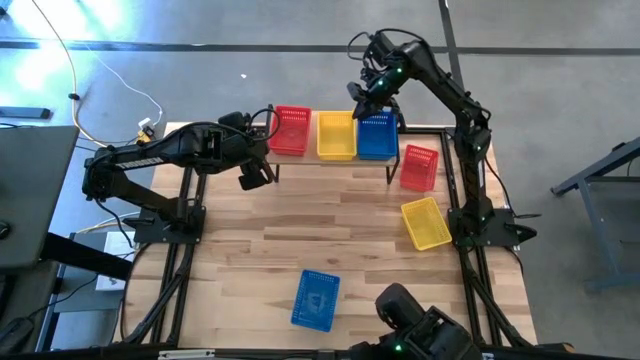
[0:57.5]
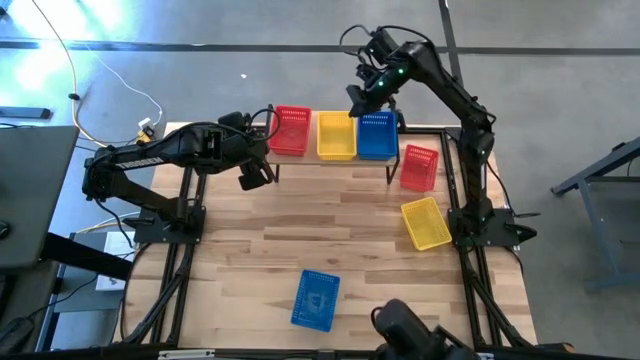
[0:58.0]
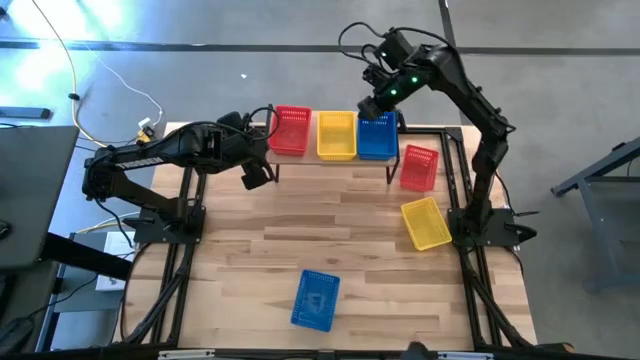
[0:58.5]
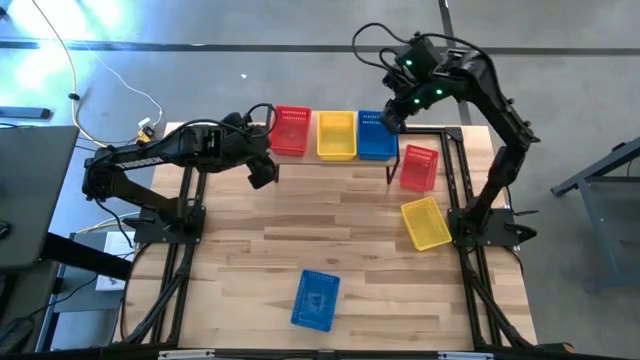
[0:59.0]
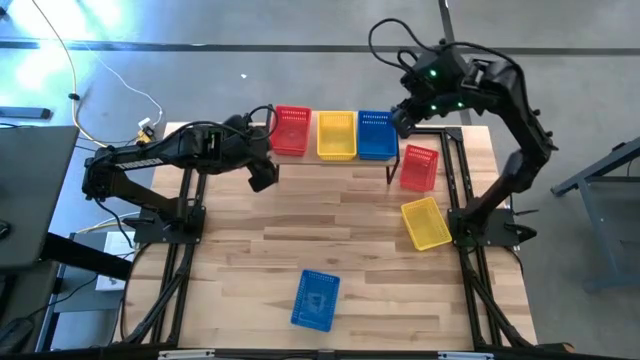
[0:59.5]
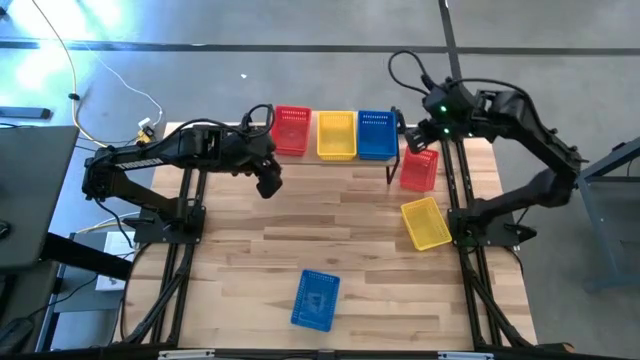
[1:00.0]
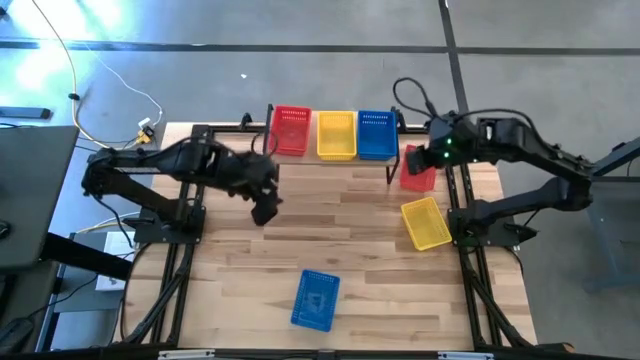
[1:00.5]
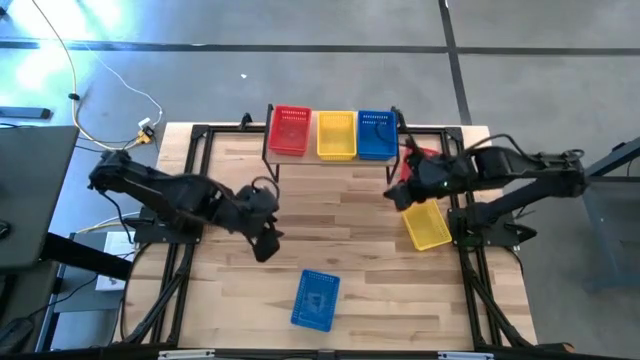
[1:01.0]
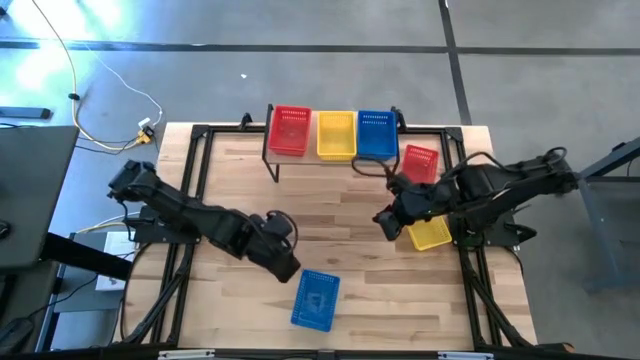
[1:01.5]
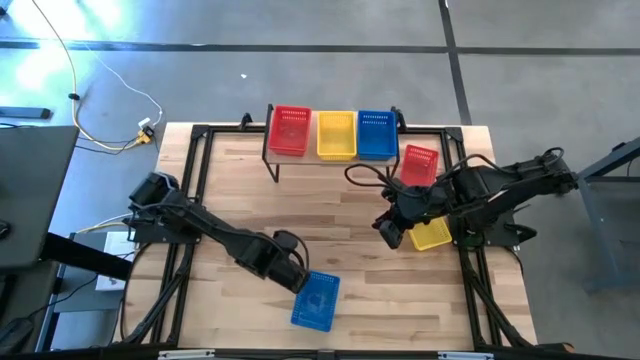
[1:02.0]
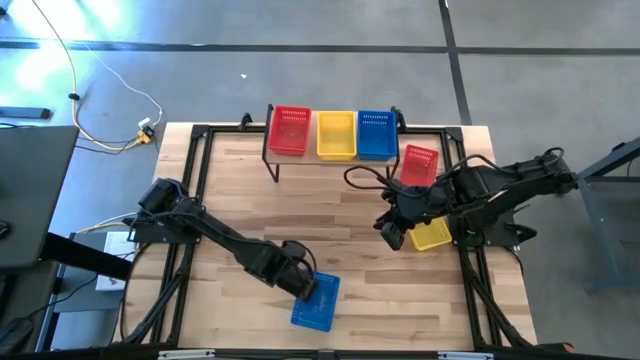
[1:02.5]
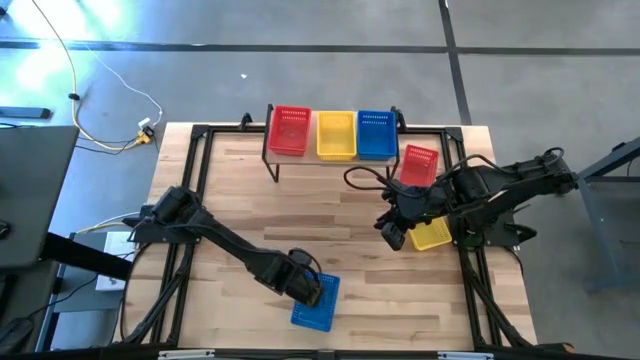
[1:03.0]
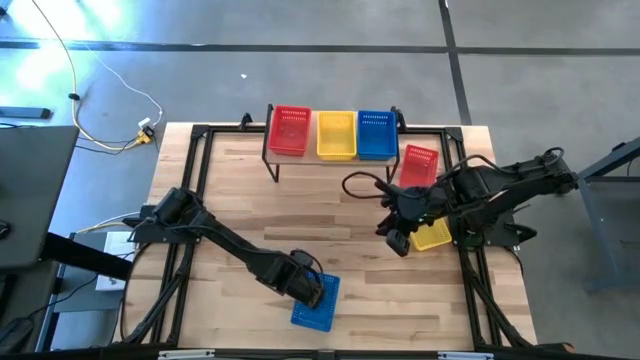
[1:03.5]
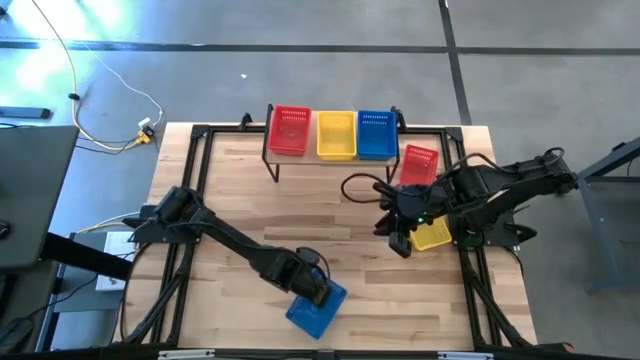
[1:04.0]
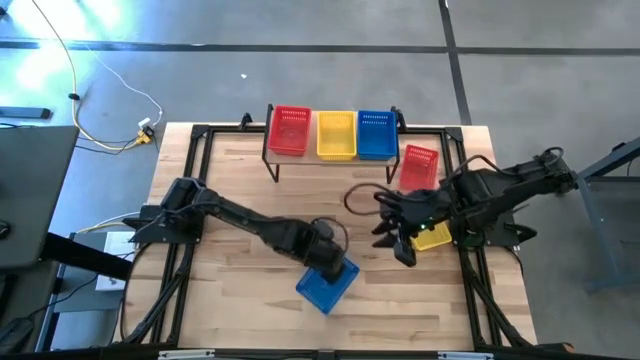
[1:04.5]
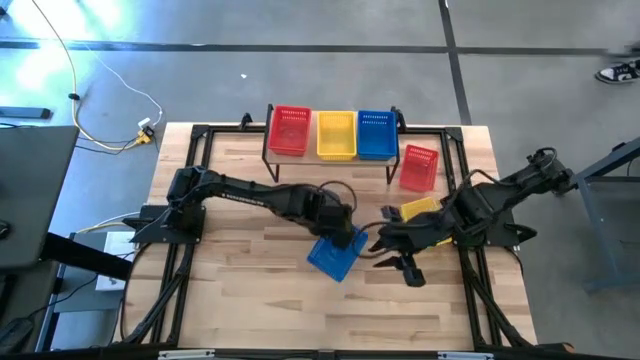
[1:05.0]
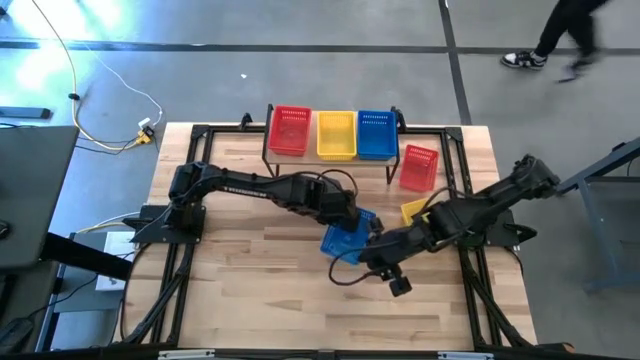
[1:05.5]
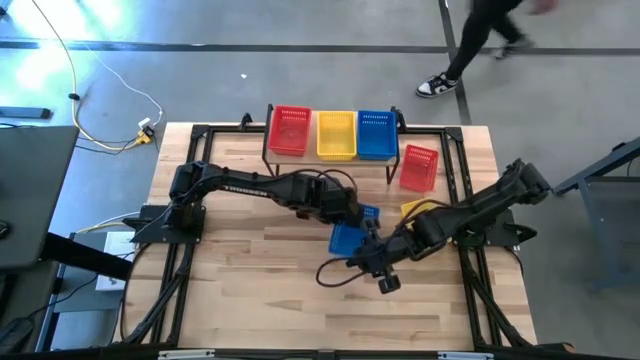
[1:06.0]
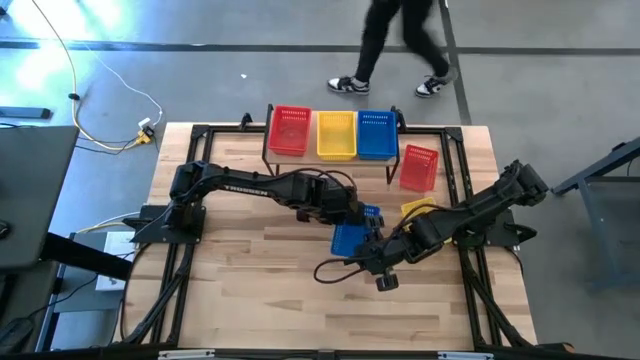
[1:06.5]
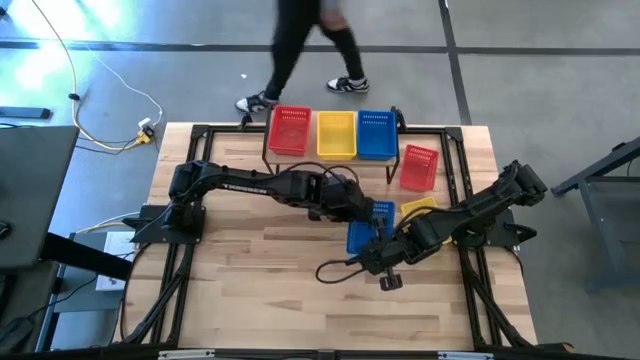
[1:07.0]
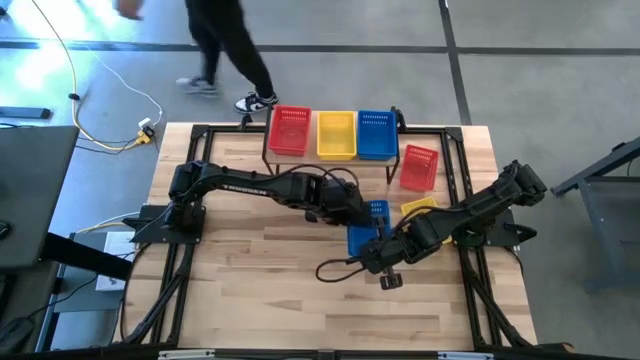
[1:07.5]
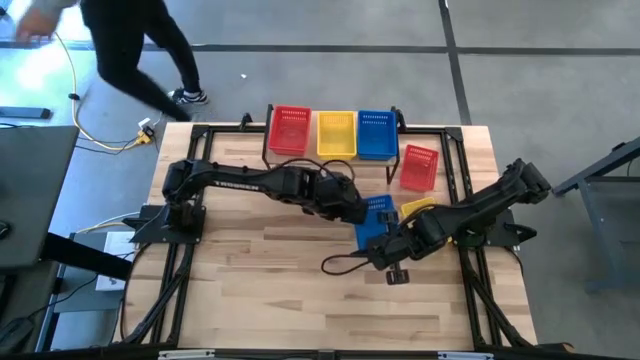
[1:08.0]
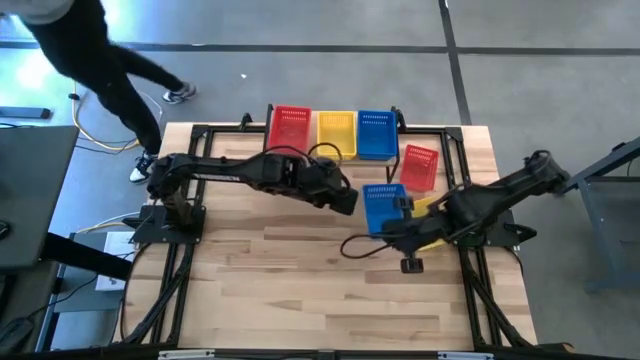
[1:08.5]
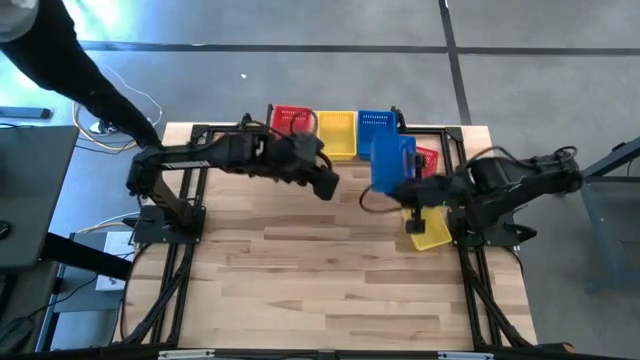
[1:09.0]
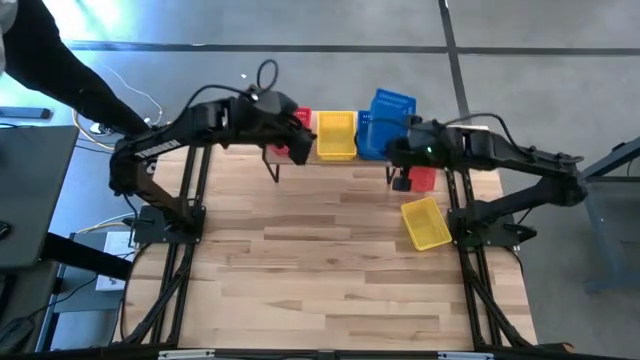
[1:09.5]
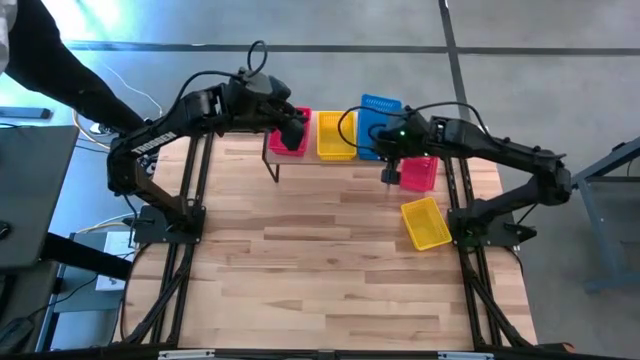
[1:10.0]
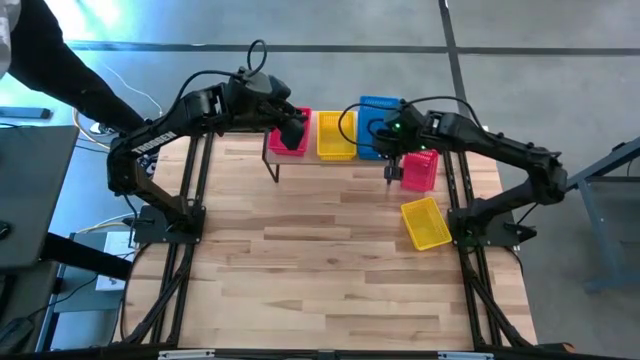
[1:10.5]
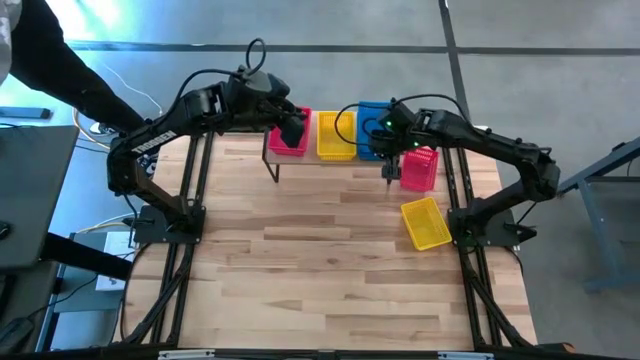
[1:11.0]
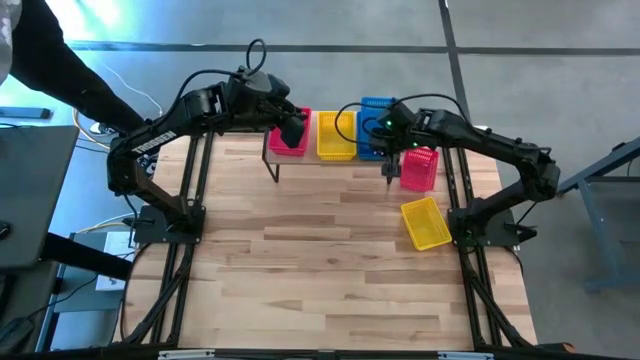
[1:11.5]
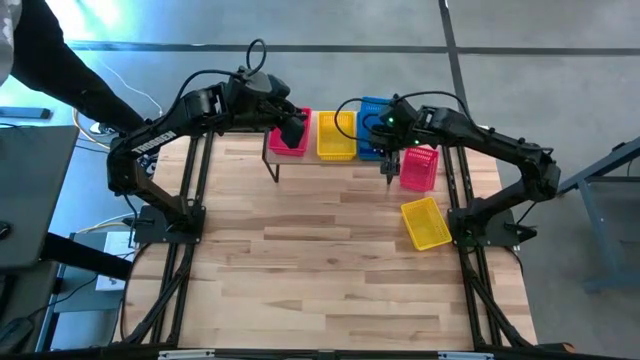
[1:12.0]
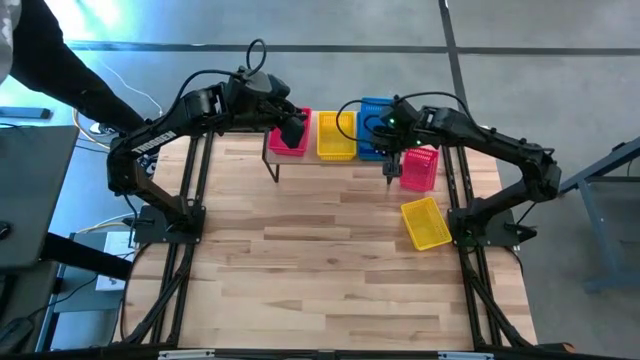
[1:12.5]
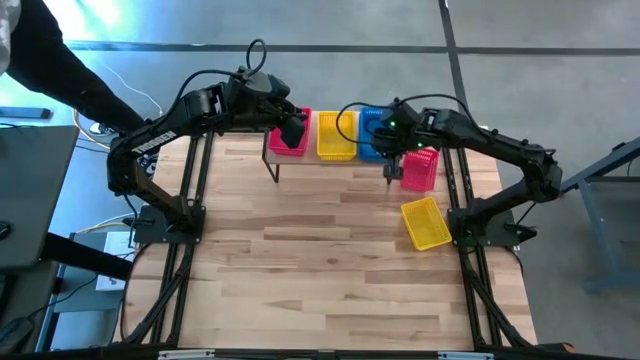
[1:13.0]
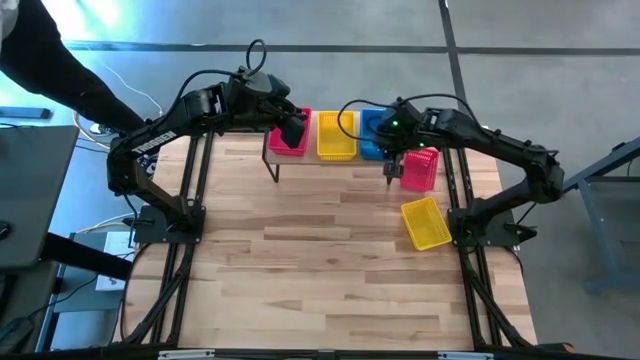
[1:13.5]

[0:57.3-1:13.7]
Task: Stack baskets on shelf by color
Stack the blue basket on top of the blue basket on the shelf

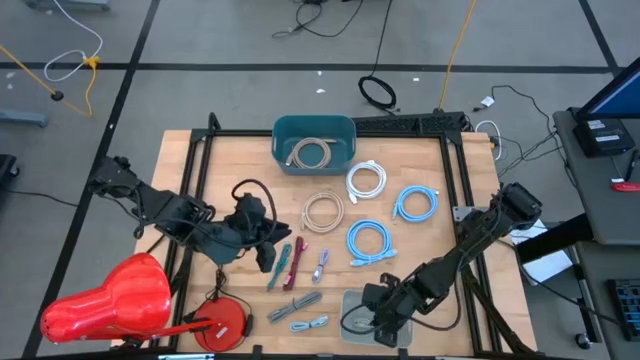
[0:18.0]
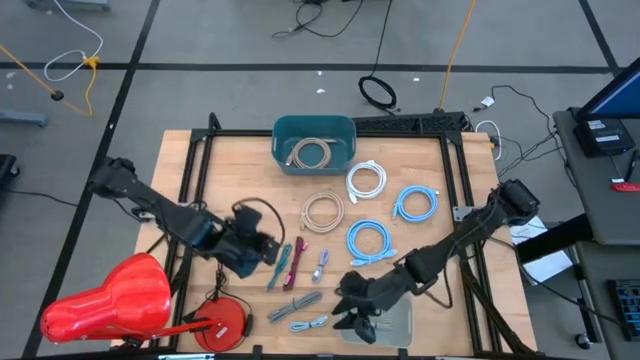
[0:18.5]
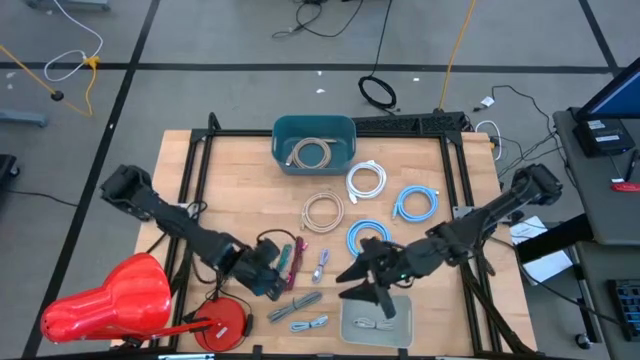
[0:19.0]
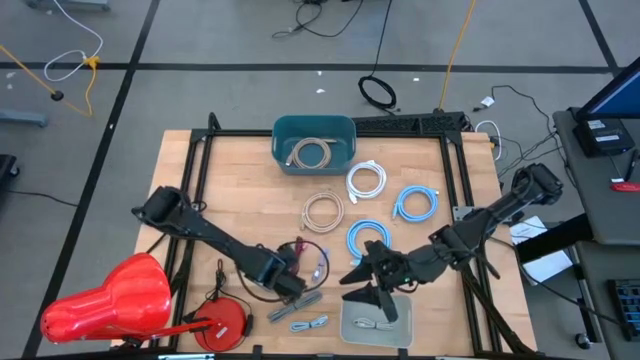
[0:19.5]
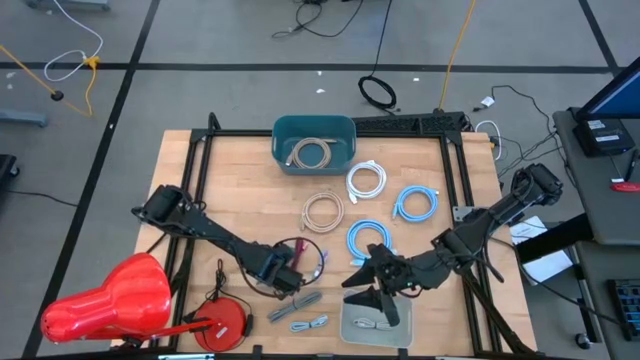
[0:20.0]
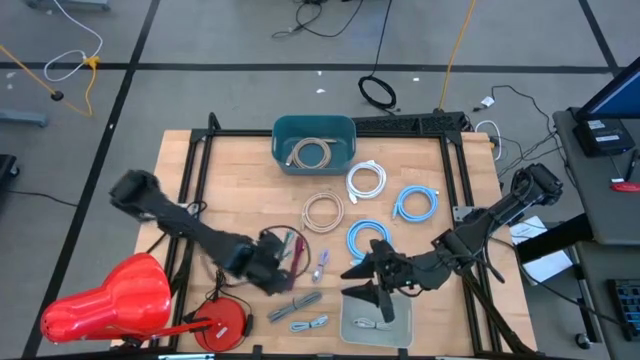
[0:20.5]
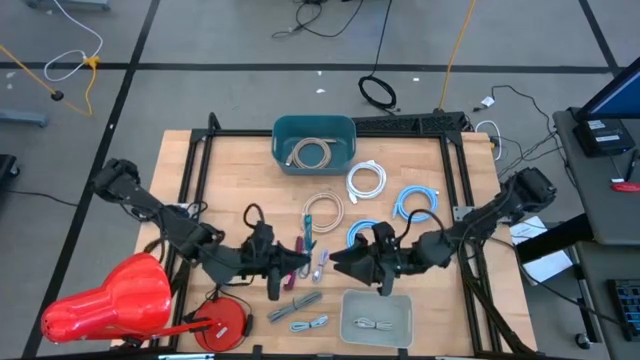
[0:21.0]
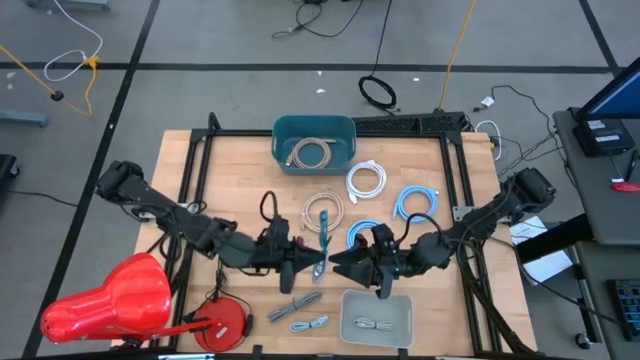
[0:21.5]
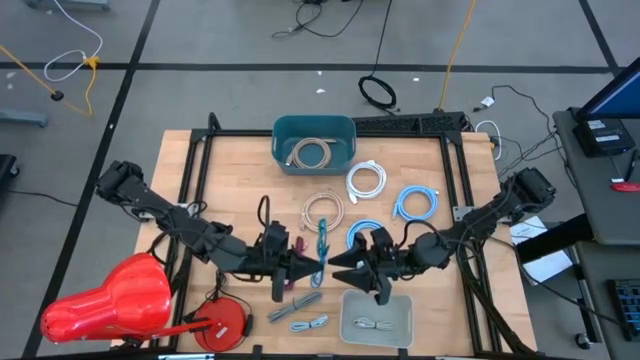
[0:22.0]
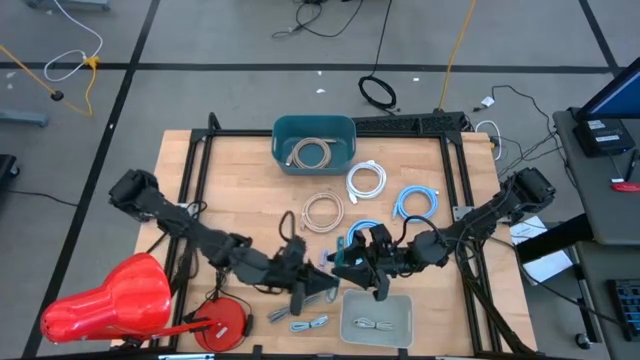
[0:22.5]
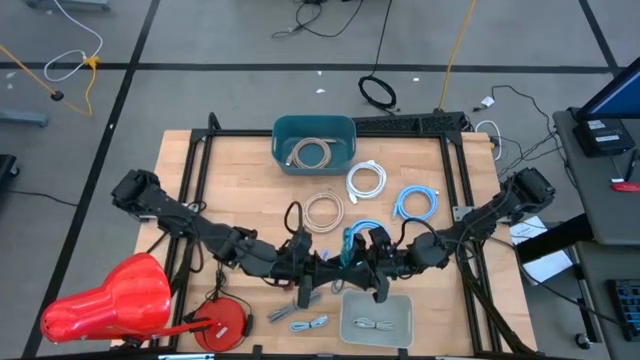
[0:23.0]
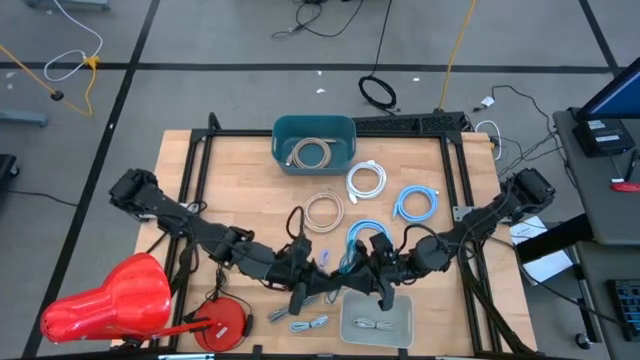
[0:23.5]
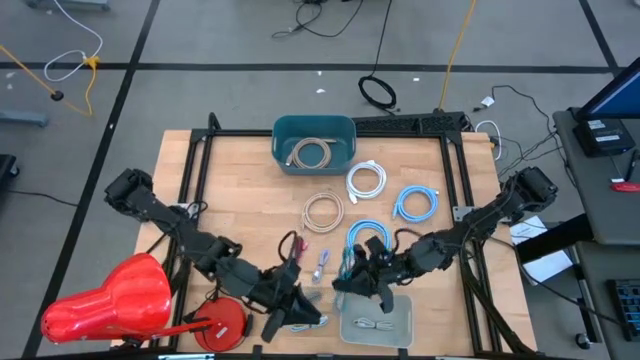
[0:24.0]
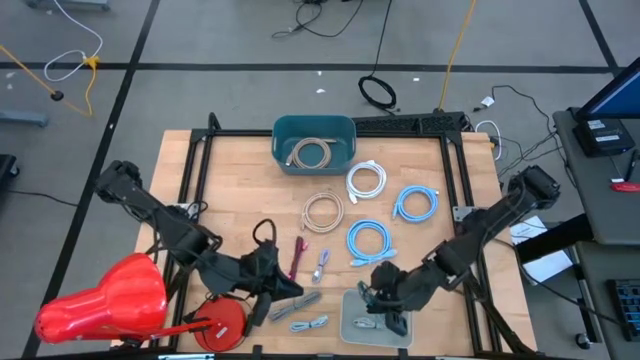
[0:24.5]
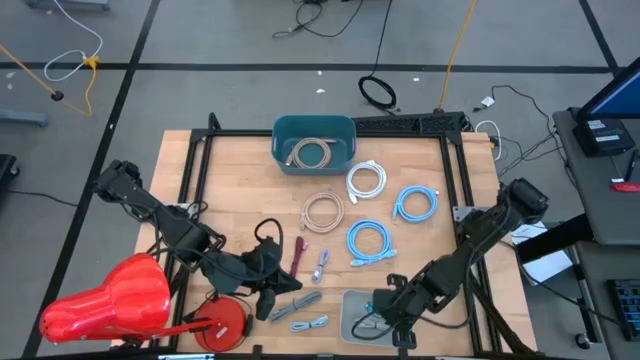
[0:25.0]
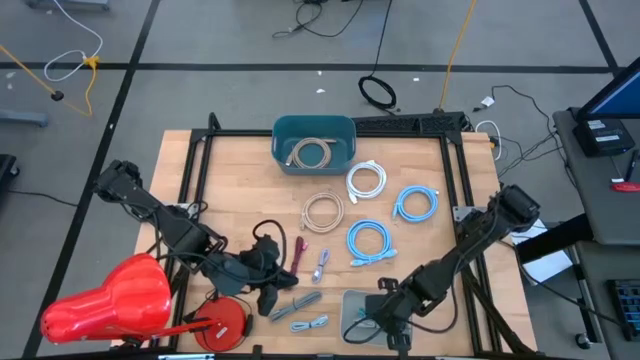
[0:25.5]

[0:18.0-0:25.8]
Task: Pick & Place USB Port
Put the blue patterned charger cable into the gray bin
